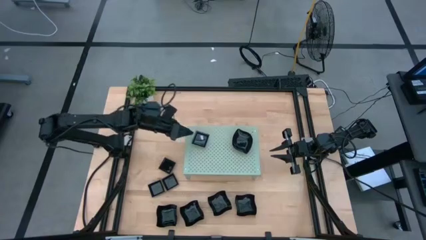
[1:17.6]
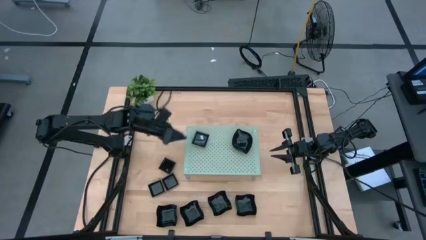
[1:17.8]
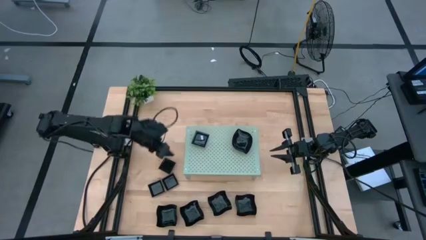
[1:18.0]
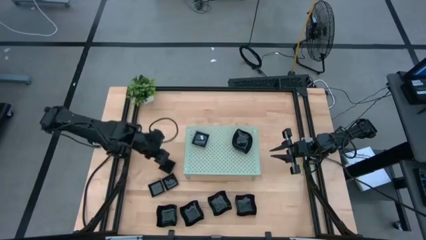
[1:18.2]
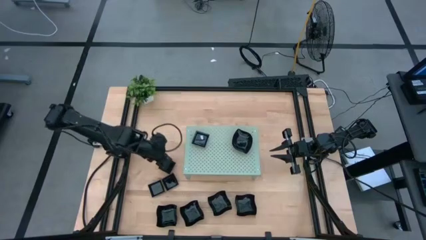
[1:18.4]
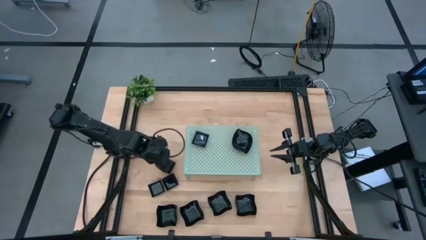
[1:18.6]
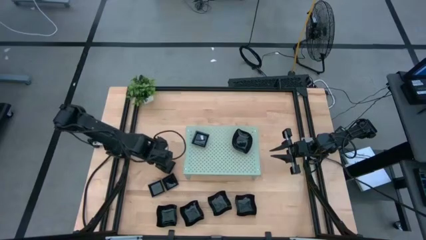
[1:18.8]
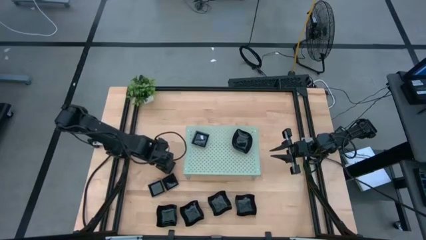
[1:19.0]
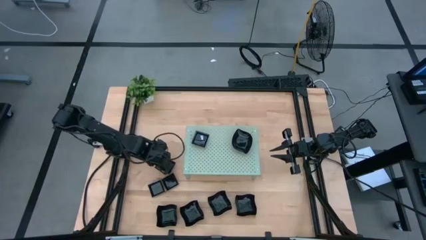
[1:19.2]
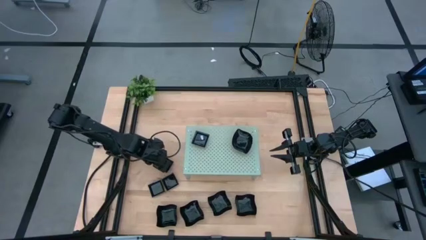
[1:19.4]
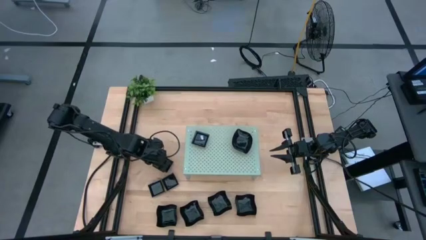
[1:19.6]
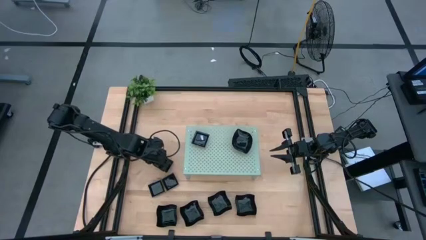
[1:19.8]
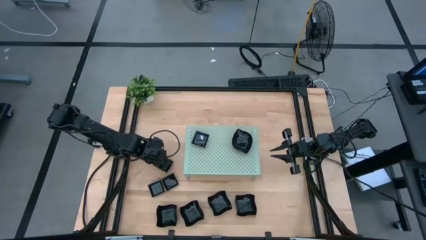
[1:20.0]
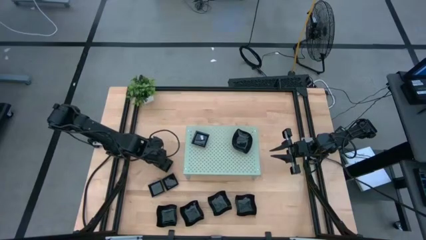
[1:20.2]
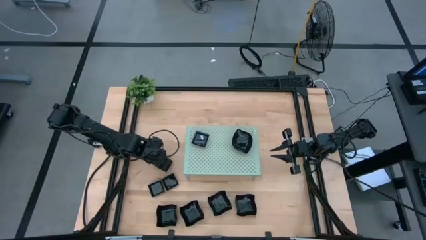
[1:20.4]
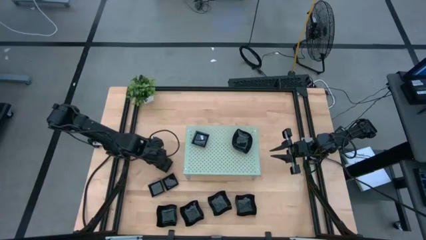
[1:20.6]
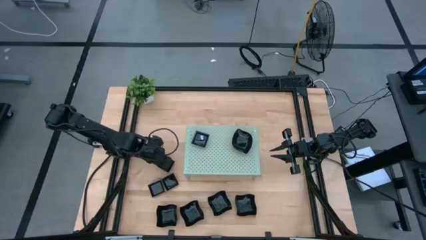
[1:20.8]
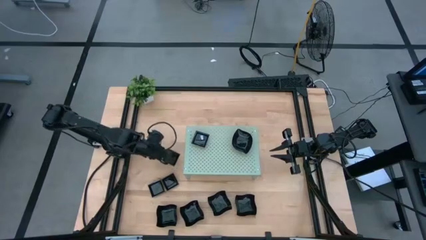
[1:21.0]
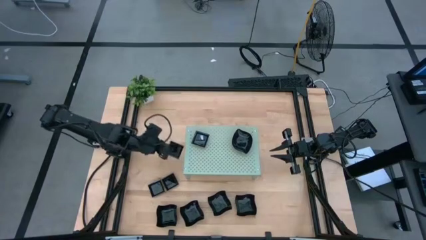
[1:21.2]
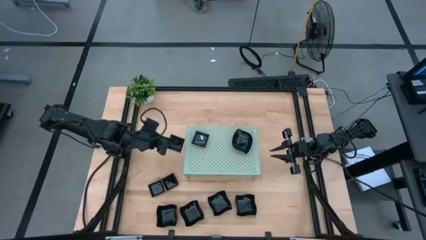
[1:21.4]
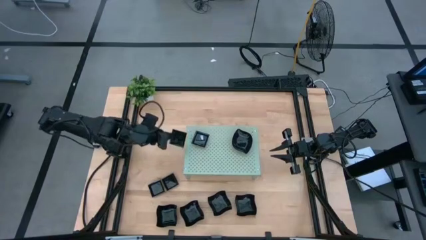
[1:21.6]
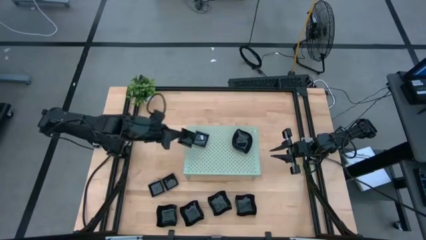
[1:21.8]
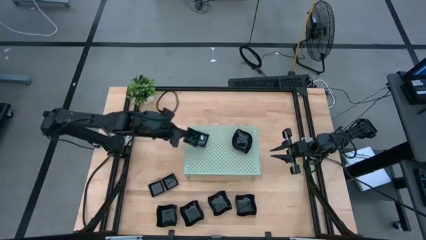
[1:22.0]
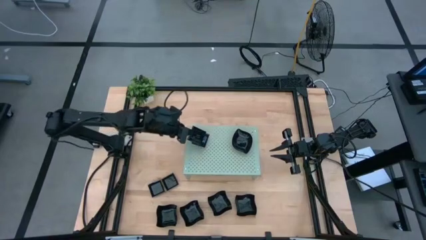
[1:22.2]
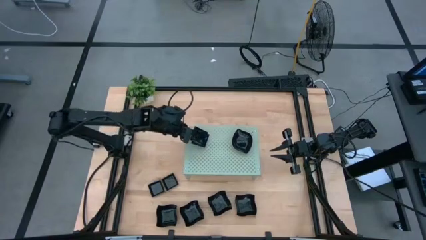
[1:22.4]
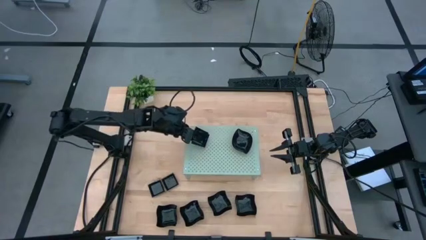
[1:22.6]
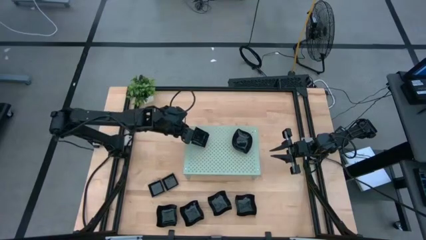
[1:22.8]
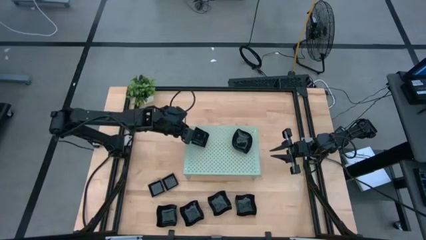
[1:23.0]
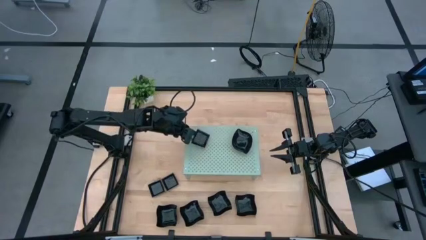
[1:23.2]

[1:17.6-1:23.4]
Task: Pick & Place Mini shaped plates
Stack the square plate on top of the square plate on the shelf

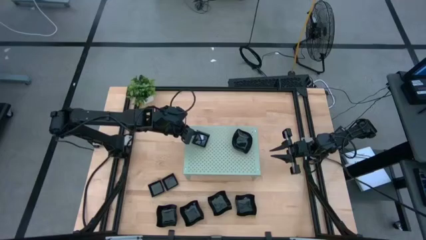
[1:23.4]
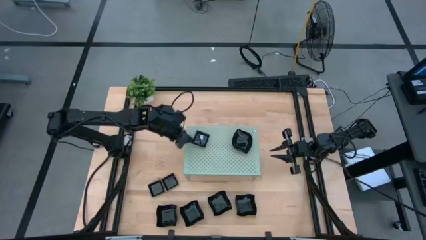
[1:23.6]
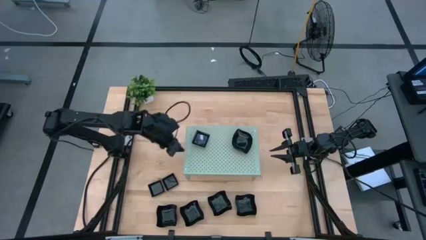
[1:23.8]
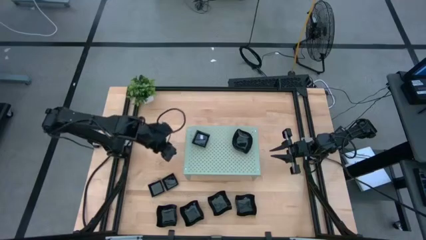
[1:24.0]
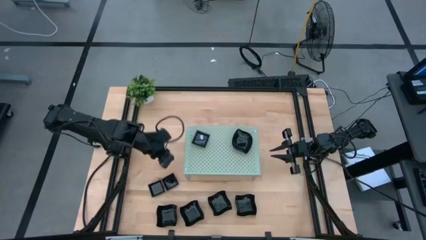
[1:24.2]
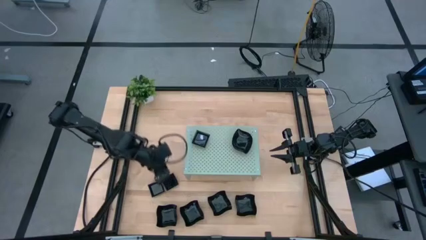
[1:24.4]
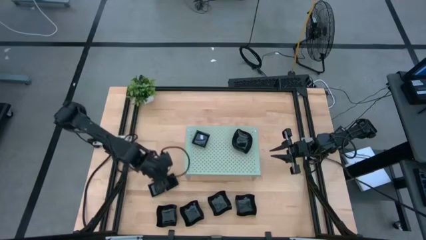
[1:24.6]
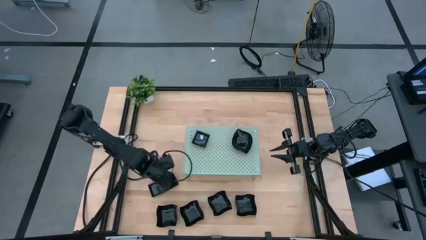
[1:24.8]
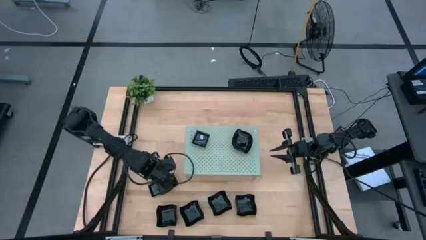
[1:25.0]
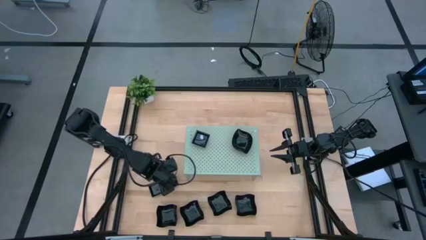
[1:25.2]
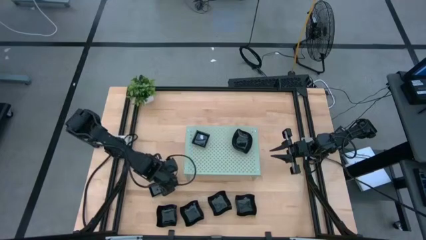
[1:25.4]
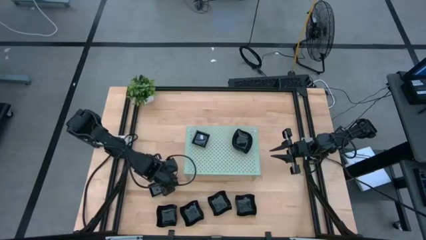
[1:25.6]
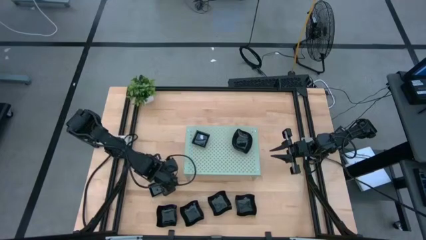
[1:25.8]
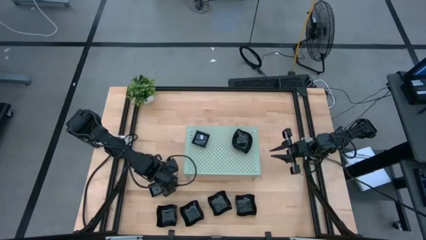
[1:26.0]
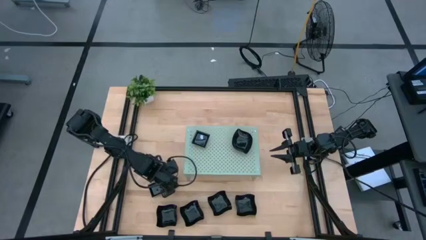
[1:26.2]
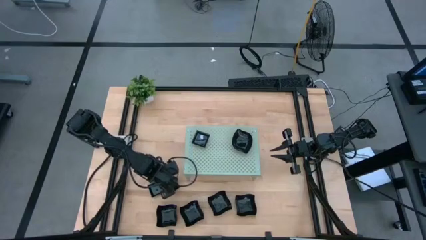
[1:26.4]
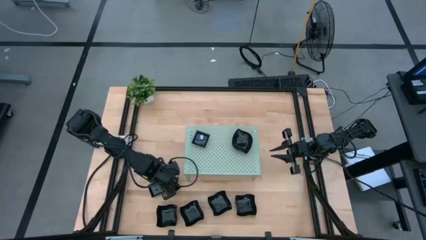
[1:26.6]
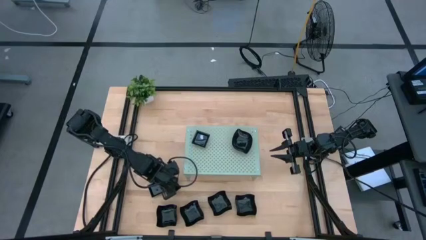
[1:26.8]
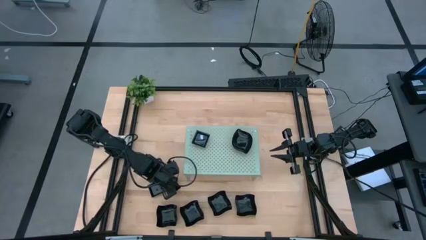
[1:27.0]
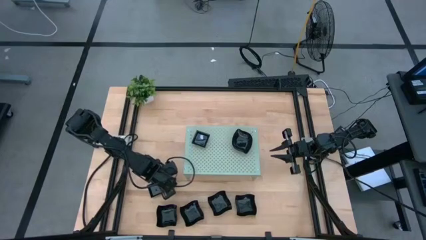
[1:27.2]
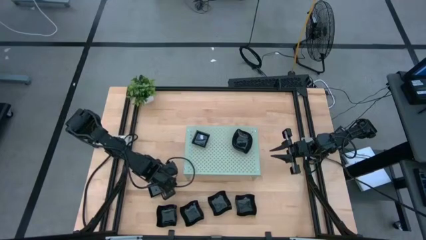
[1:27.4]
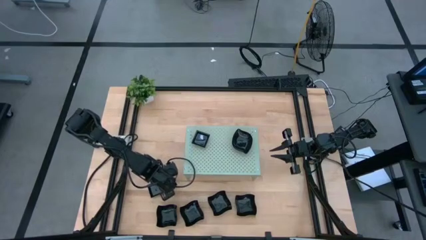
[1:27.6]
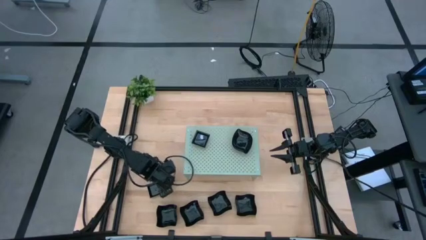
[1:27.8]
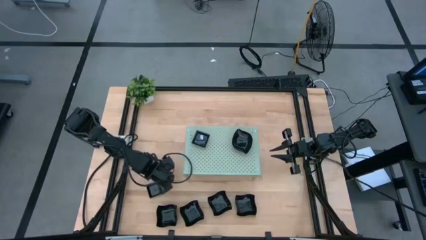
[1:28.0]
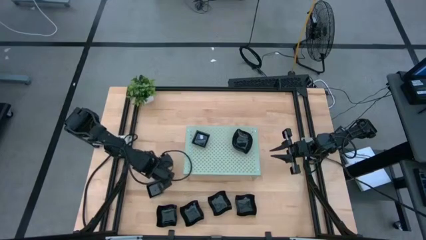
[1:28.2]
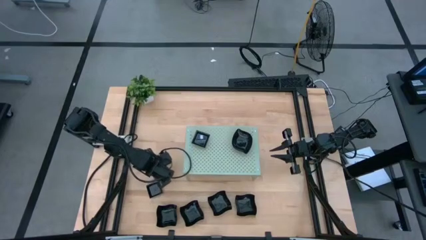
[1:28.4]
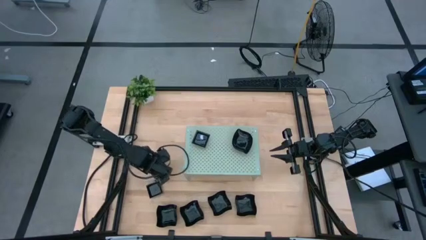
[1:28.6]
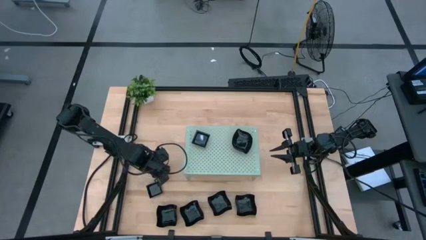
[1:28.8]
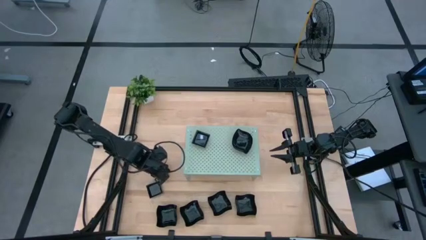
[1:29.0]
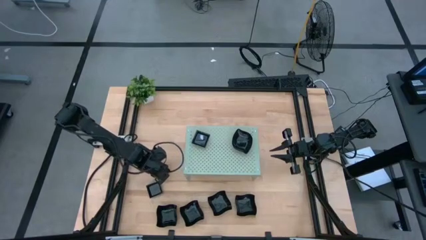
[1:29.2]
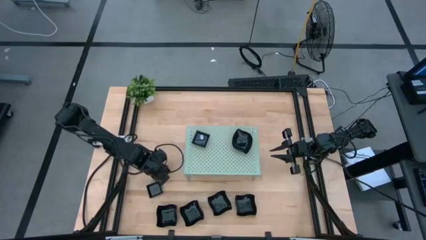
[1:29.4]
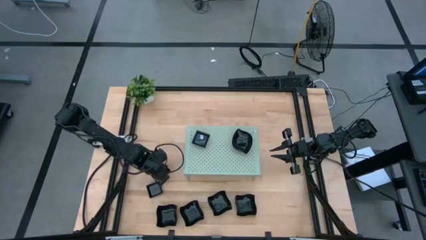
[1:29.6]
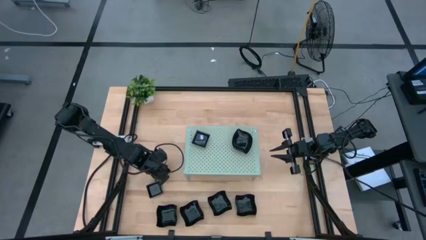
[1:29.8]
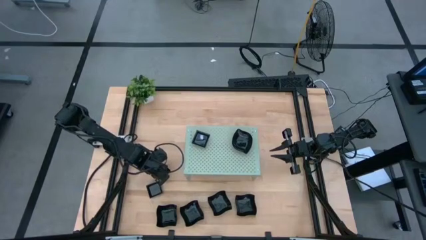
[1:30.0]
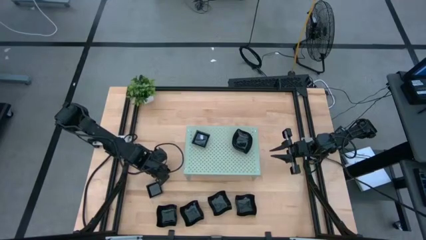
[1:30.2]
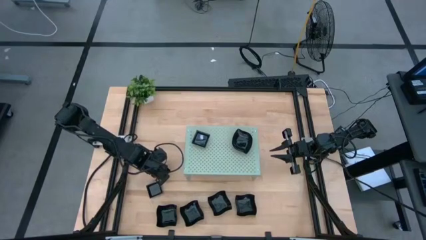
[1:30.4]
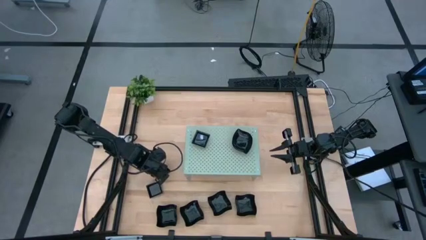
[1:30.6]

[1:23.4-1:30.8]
Stack the square plate on top of the square plate on the shelf

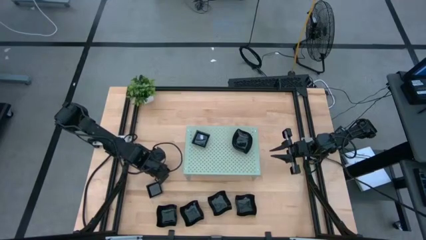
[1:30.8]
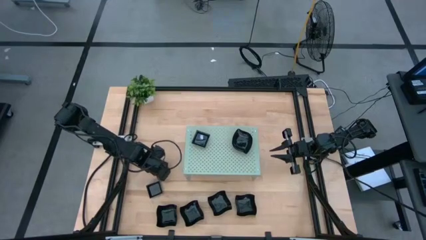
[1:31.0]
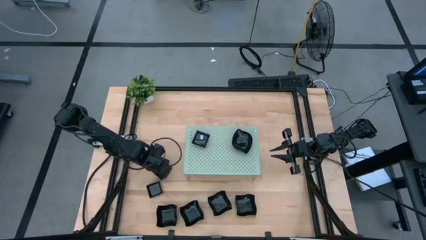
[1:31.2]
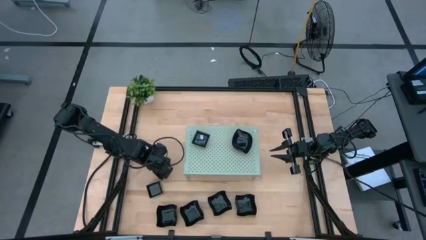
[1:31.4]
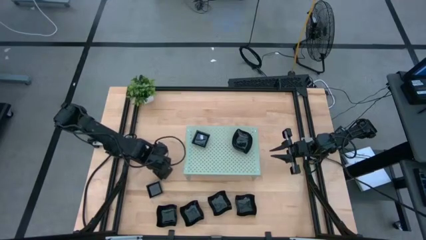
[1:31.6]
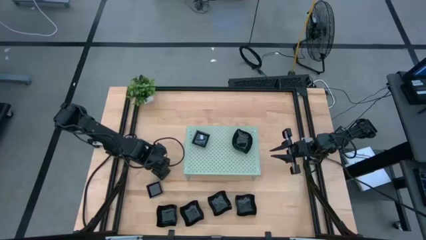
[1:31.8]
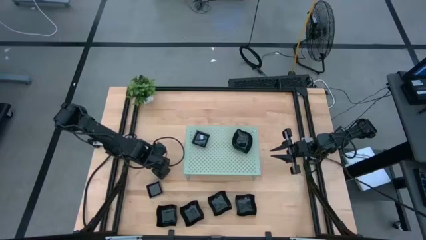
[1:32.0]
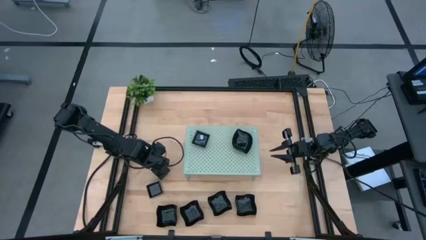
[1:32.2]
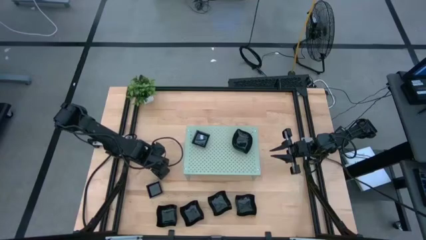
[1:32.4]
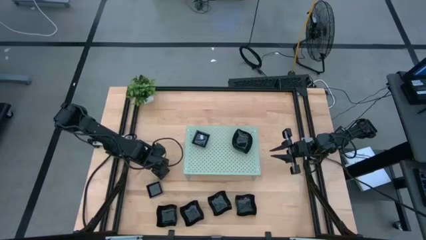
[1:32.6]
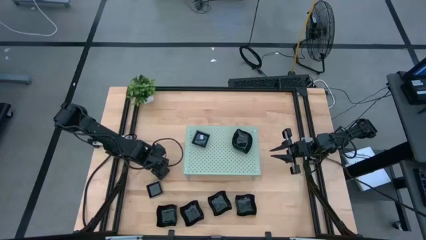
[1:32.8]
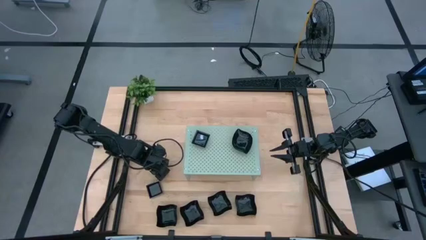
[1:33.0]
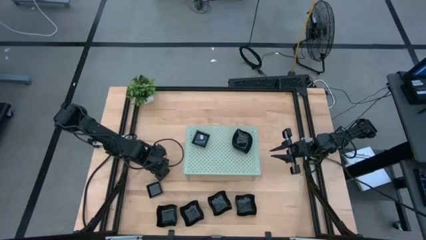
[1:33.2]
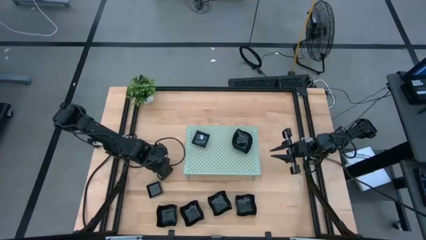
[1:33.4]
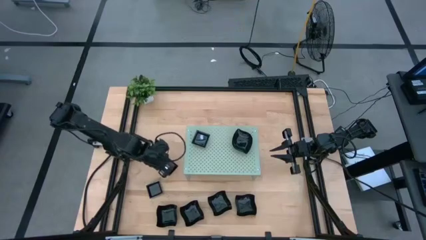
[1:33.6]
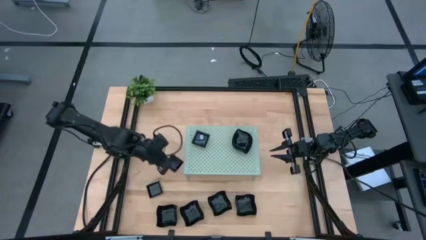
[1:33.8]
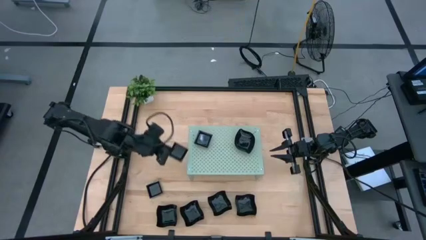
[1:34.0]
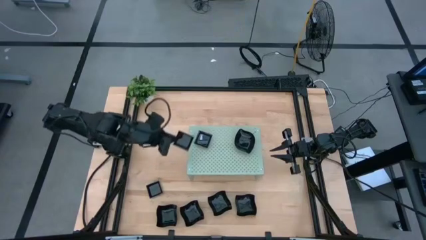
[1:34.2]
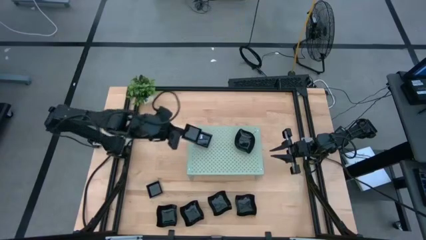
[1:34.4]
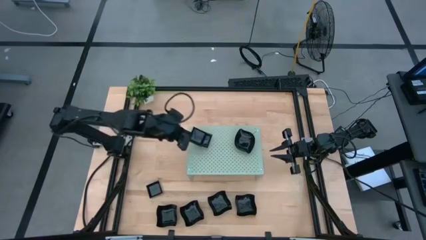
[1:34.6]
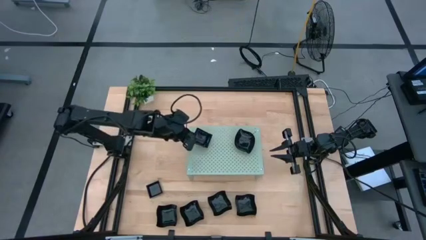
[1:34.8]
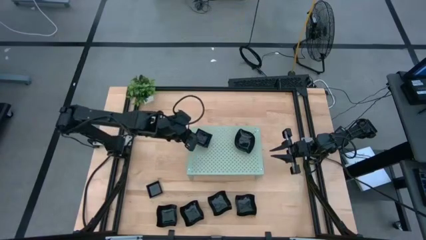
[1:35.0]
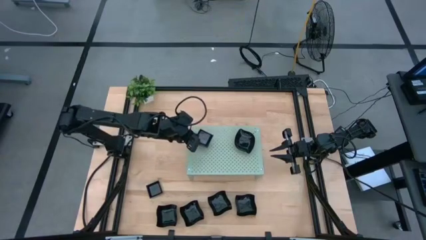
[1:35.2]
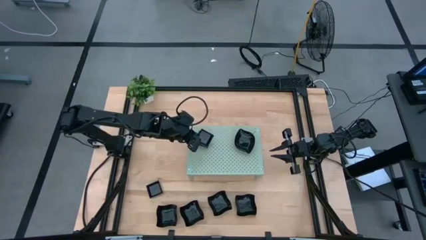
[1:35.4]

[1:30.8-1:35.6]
Stack the square plate on top of the square plate on the shelf
